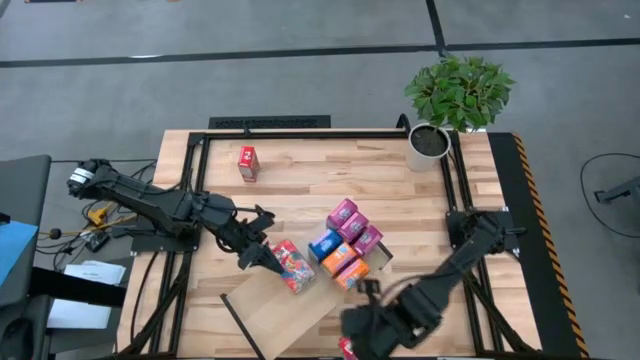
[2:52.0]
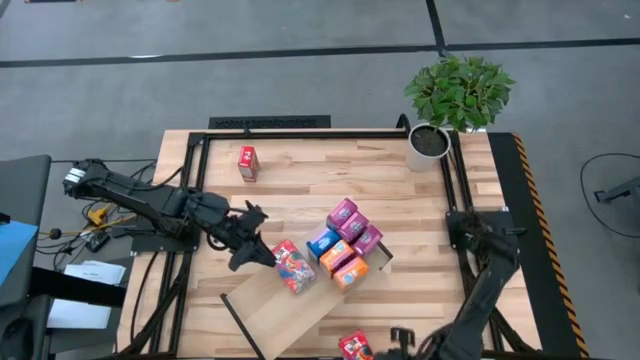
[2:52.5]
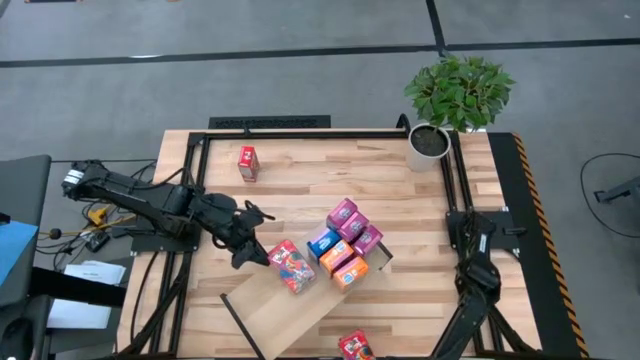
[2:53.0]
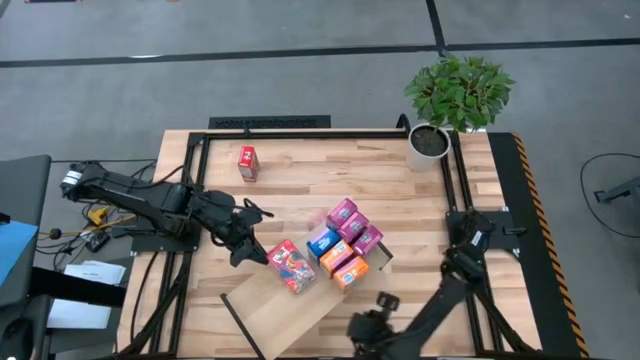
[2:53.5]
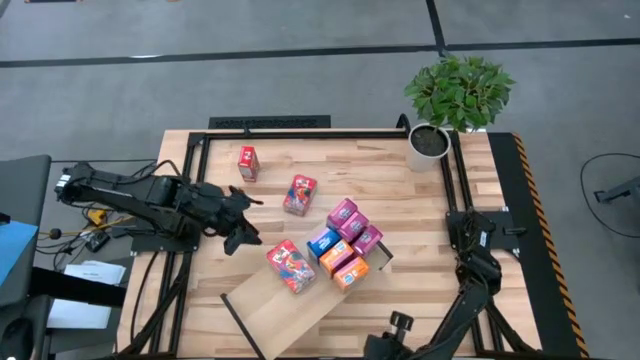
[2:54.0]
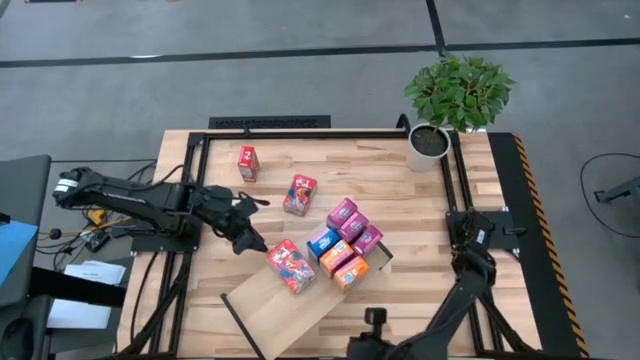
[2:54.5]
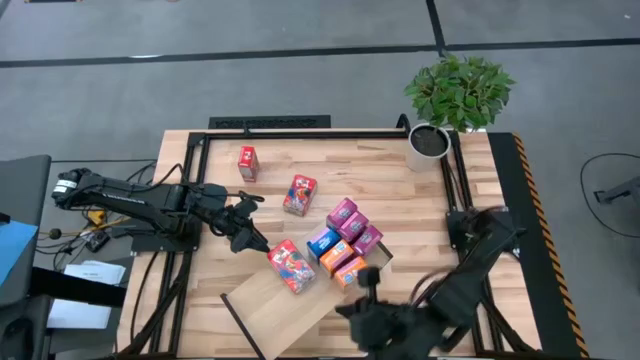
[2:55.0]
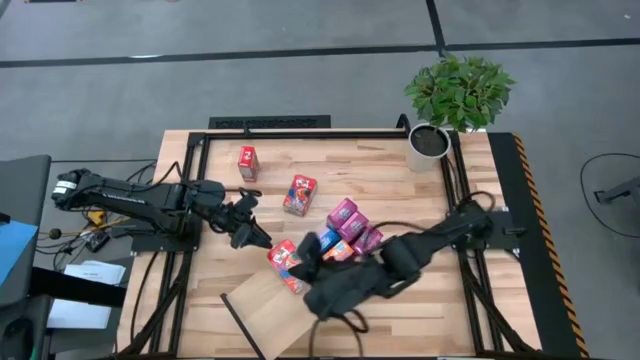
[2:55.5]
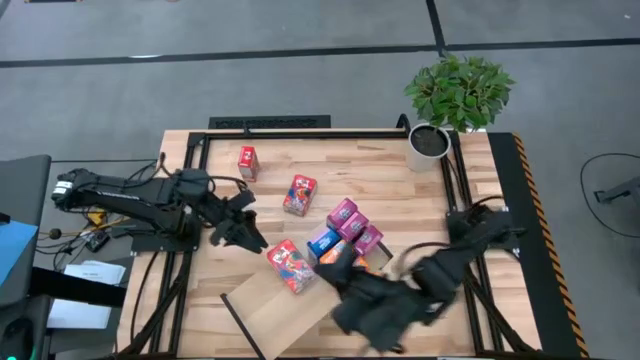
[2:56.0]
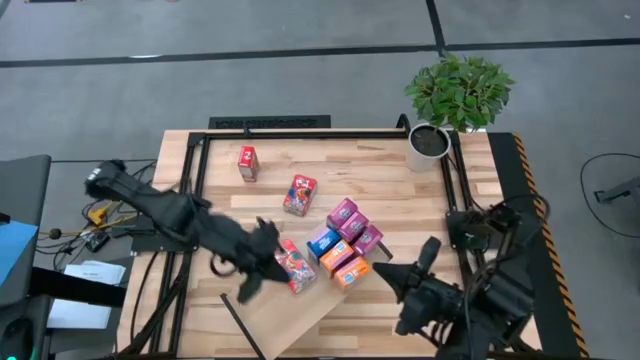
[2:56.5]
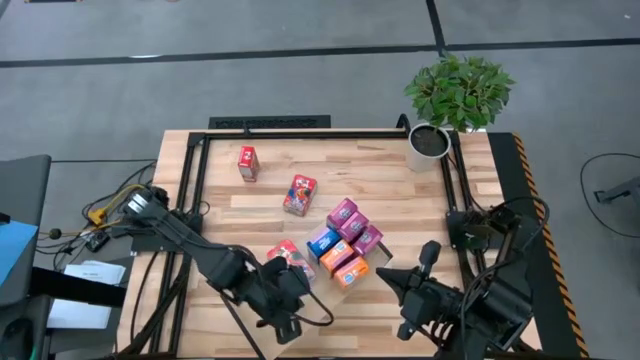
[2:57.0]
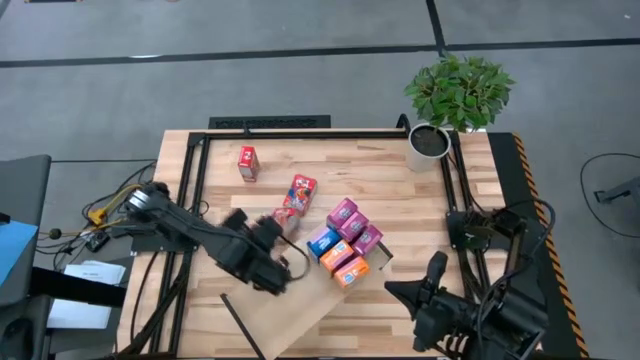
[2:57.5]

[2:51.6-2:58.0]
Task: Stack cereal on shelf
Remove the cereal box from the shelf

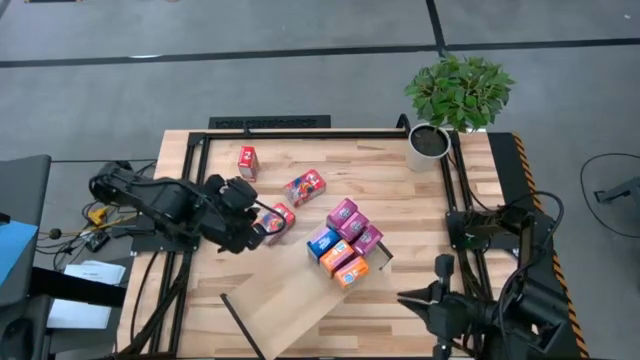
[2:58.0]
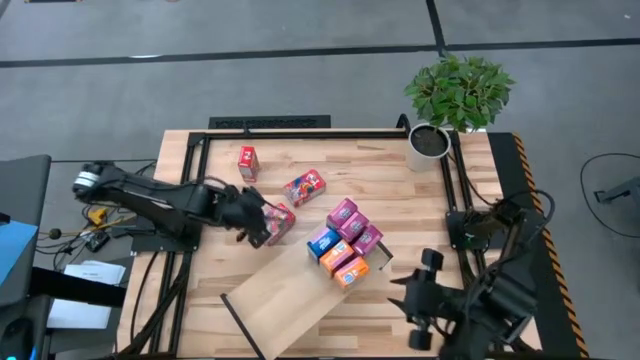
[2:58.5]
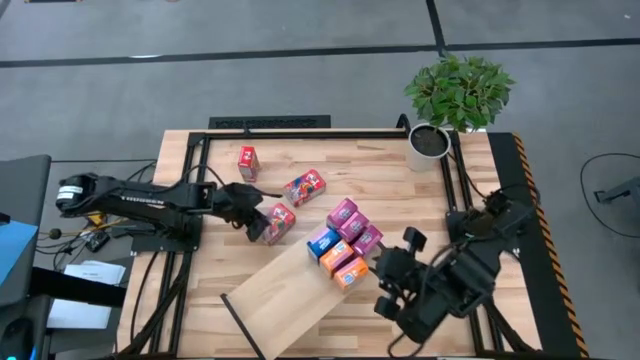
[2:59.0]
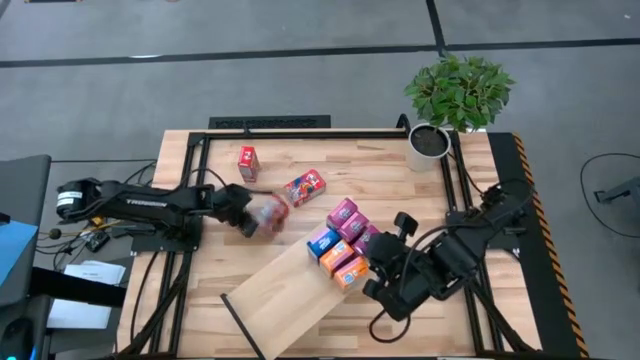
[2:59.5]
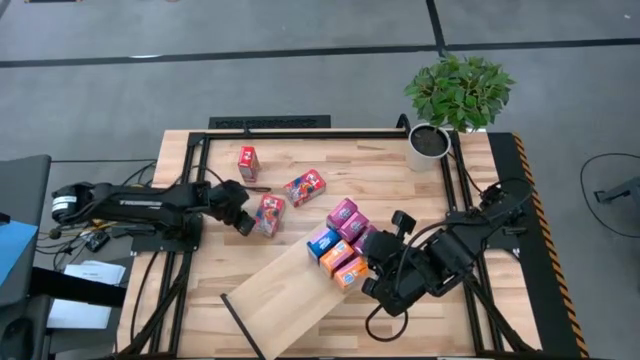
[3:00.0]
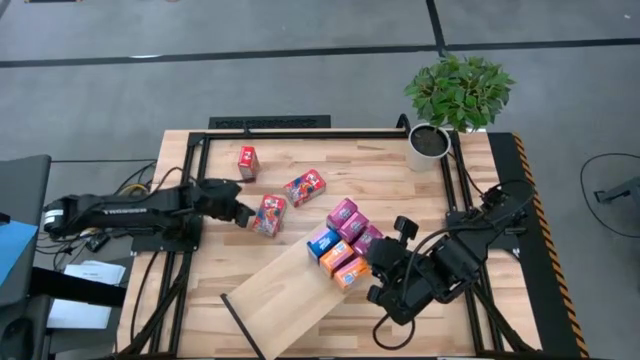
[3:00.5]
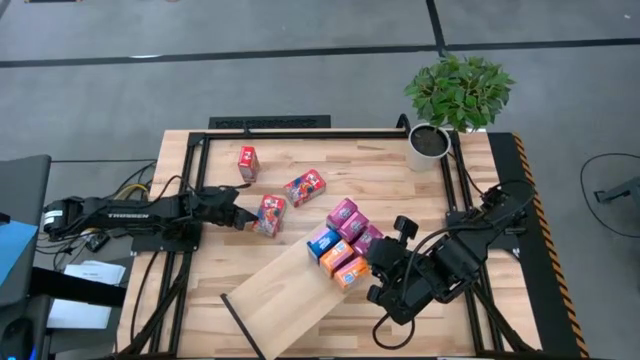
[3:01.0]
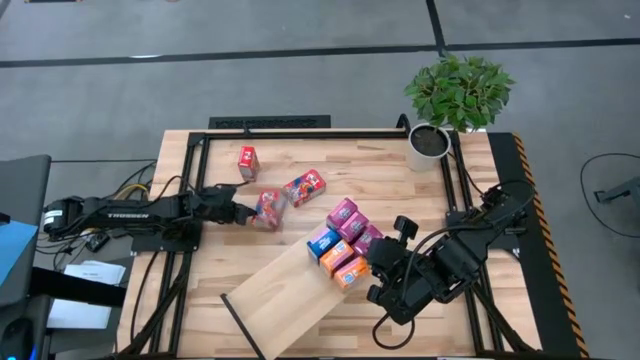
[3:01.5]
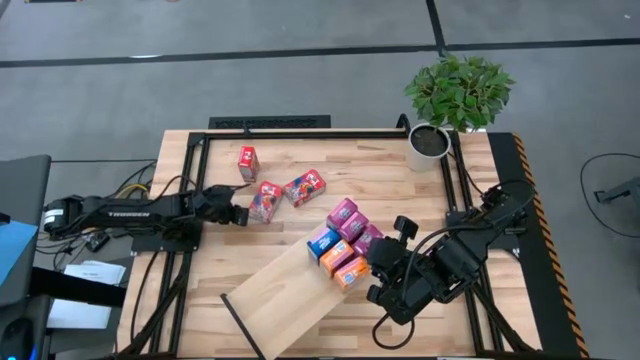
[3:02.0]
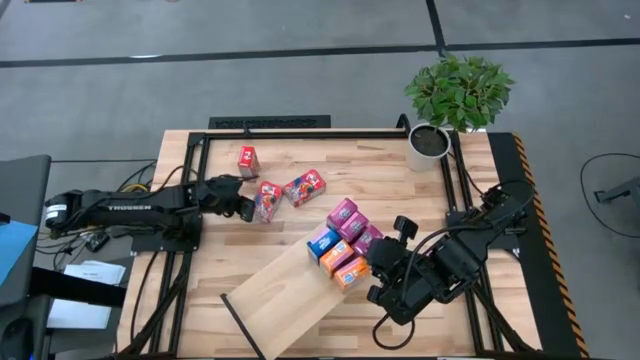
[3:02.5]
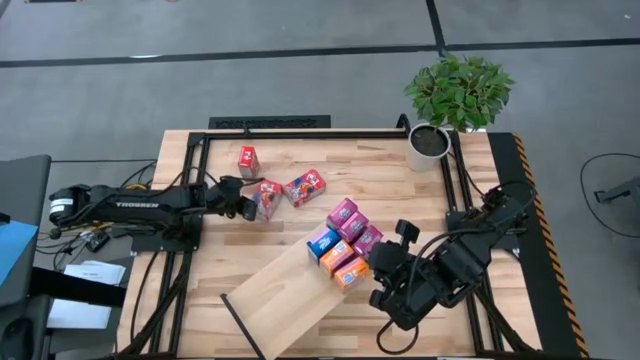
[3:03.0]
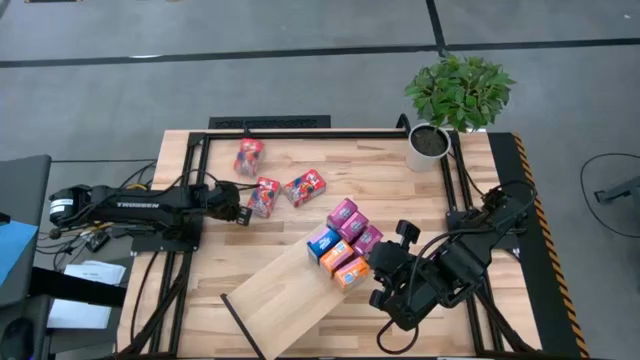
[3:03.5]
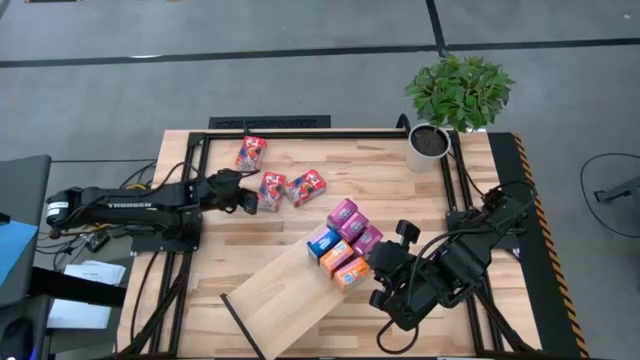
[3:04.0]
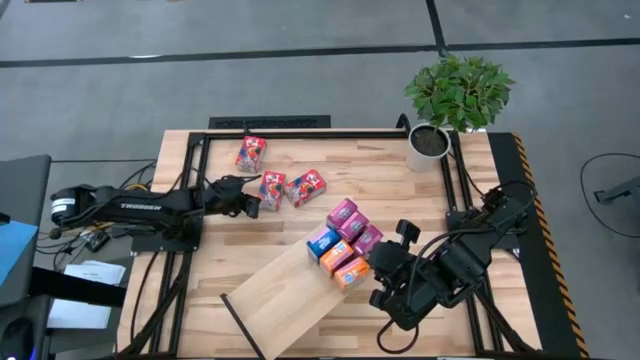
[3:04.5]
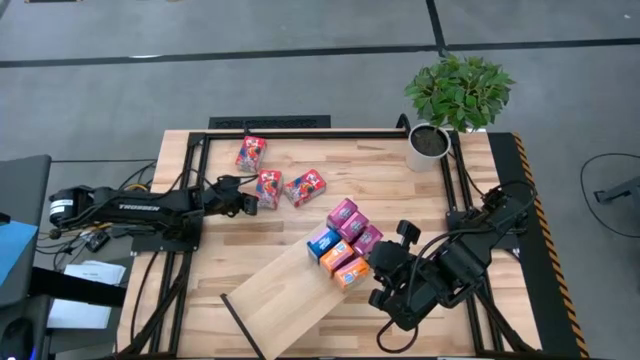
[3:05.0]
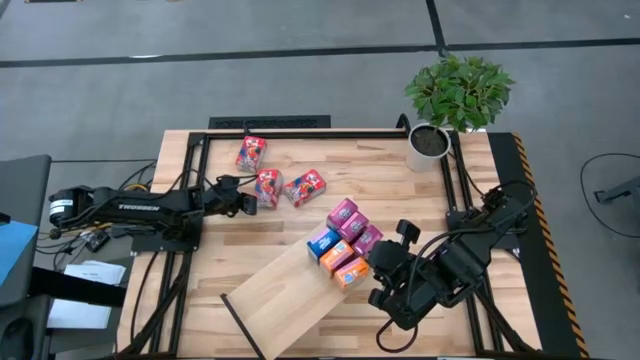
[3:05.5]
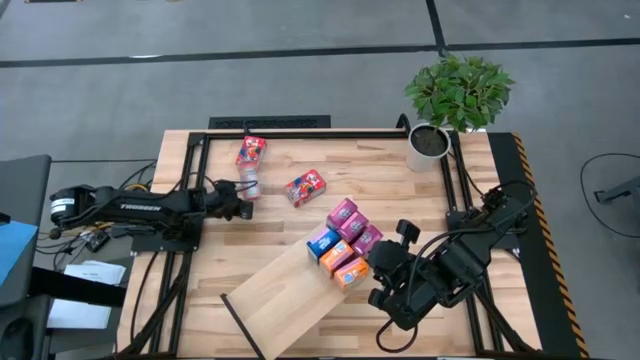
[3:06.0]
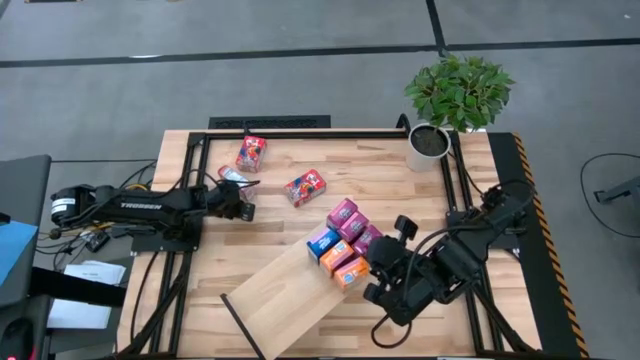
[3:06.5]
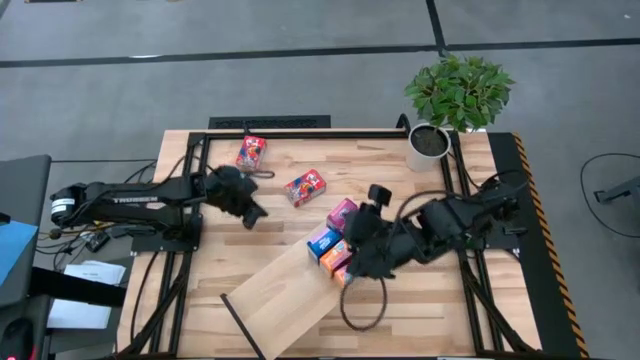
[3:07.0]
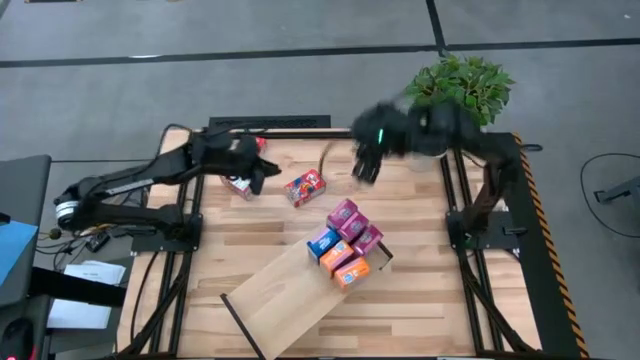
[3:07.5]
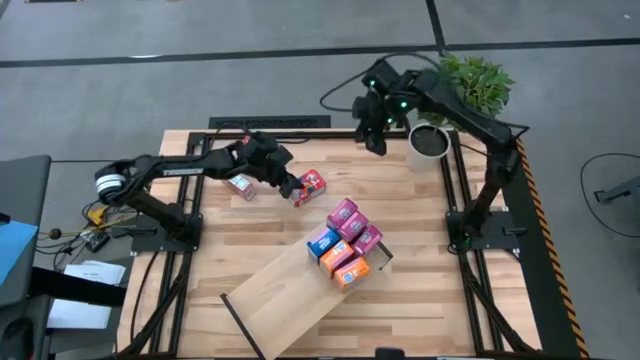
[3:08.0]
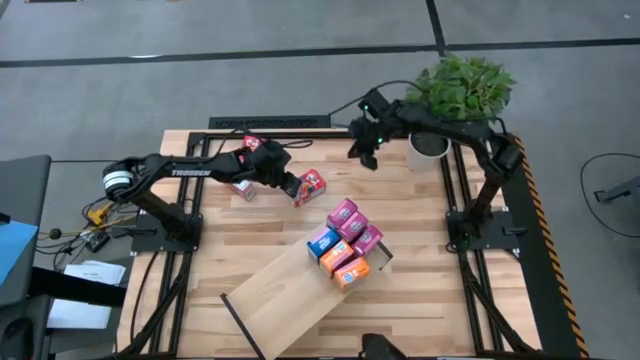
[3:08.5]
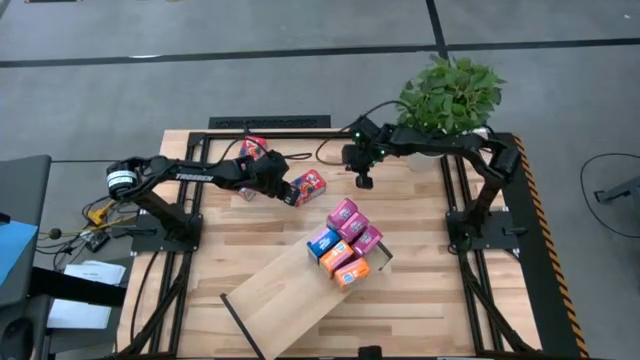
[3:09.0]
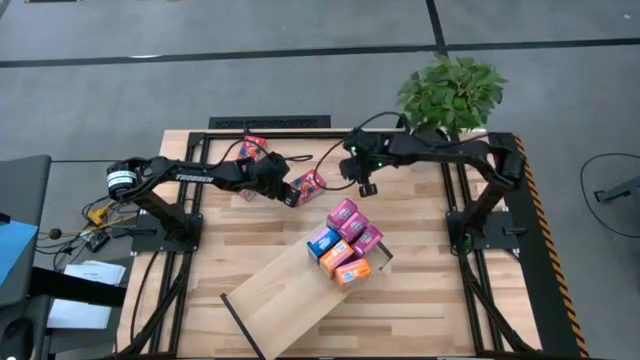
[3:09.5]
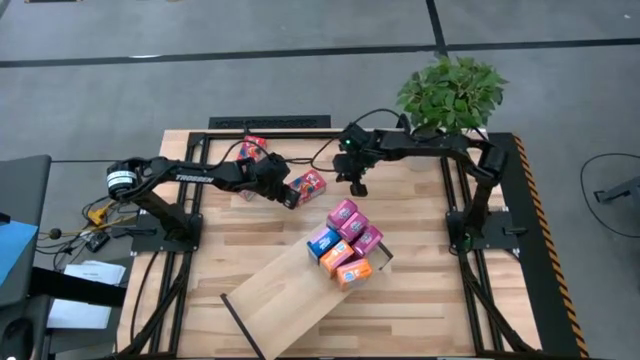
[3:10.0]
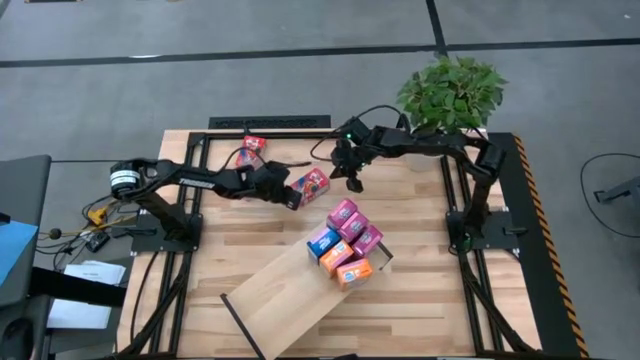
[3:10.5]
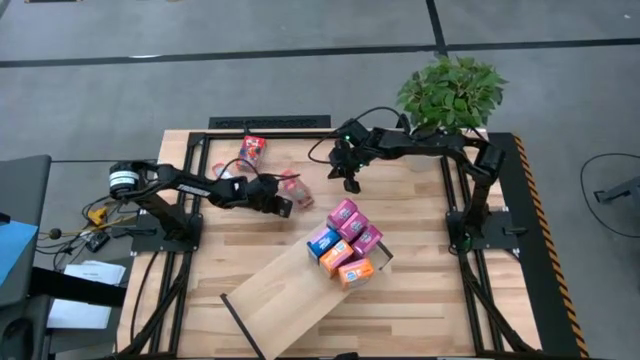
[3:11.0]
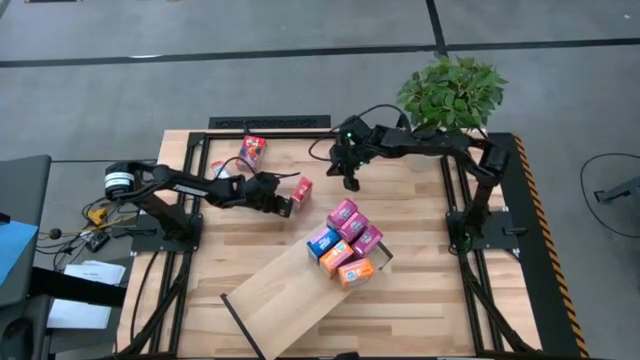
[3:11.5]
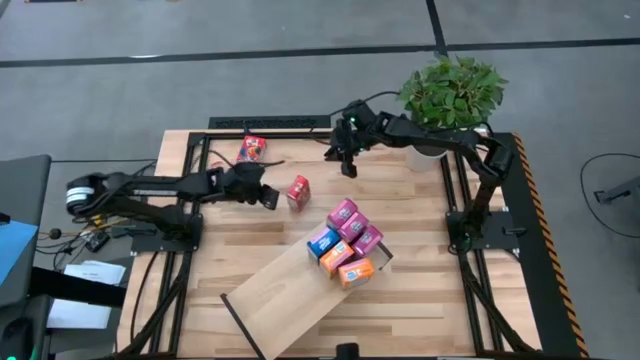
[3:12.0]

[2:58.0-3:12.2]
Put the right red cereal box onto the shelf
